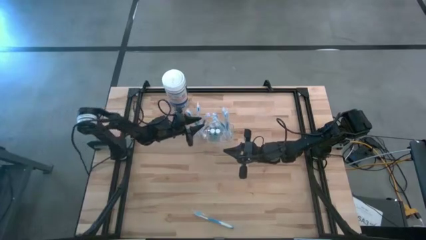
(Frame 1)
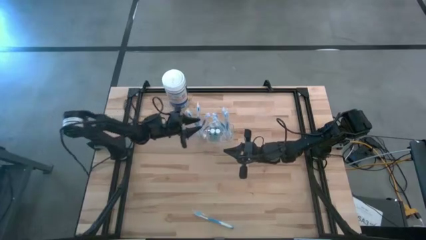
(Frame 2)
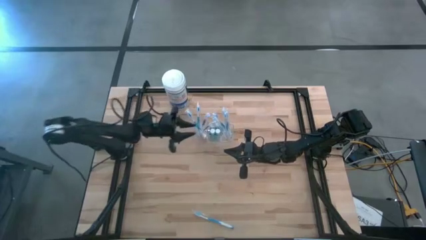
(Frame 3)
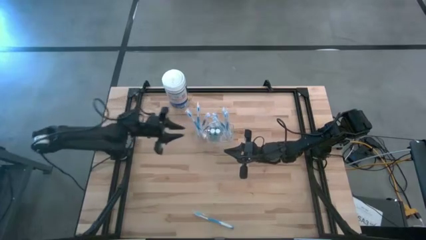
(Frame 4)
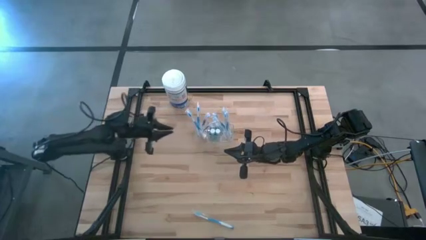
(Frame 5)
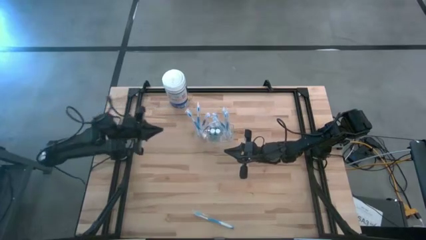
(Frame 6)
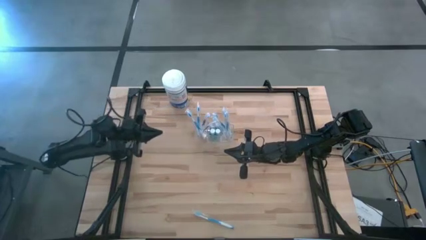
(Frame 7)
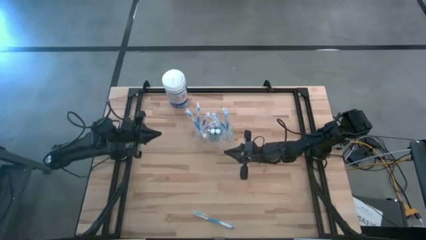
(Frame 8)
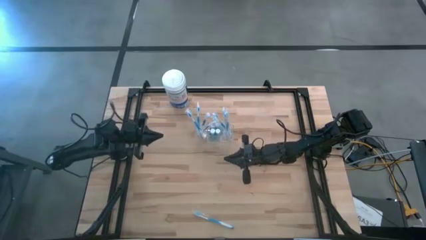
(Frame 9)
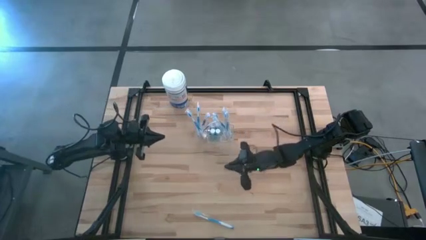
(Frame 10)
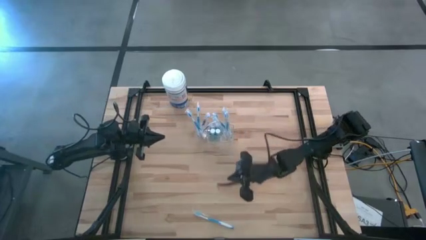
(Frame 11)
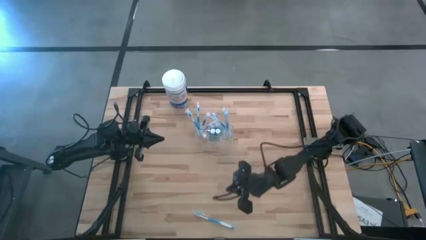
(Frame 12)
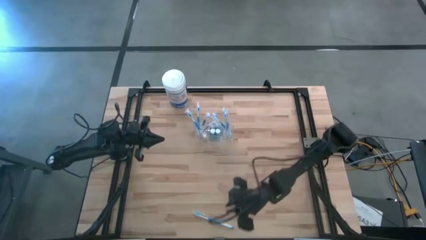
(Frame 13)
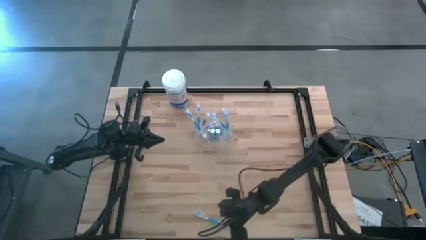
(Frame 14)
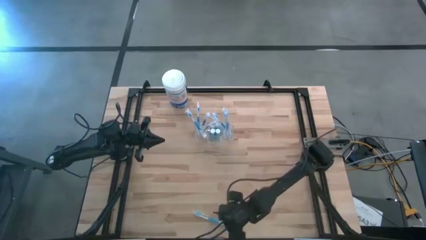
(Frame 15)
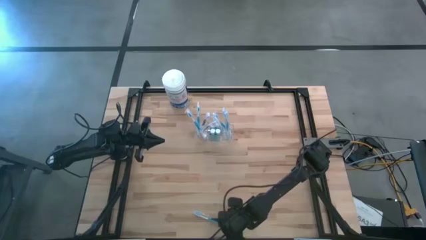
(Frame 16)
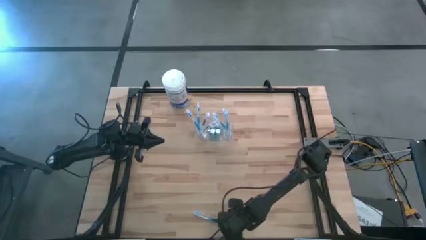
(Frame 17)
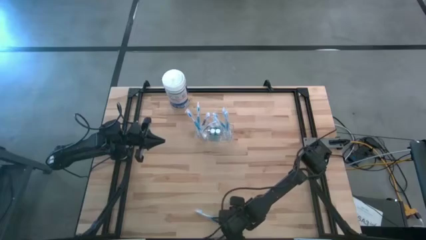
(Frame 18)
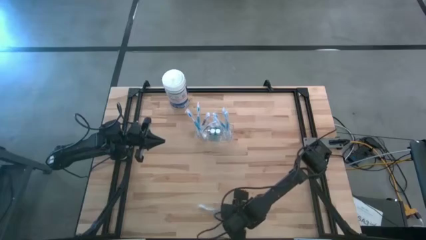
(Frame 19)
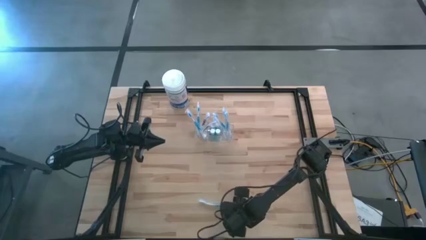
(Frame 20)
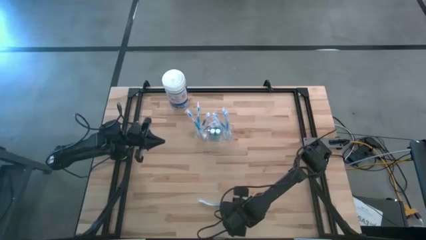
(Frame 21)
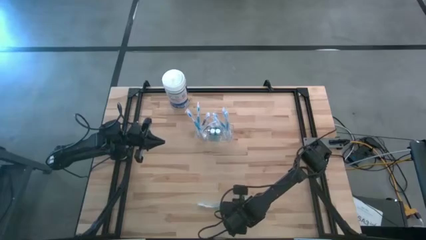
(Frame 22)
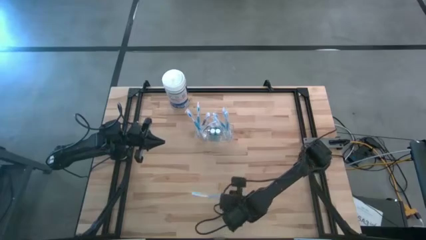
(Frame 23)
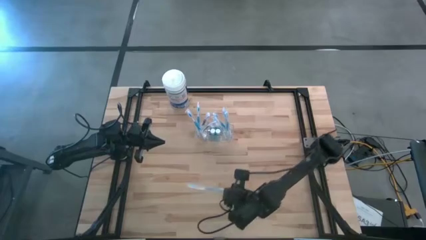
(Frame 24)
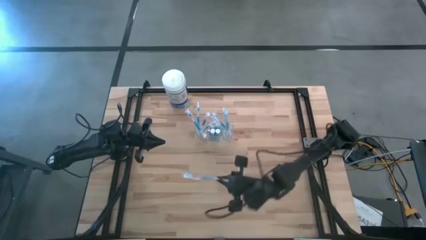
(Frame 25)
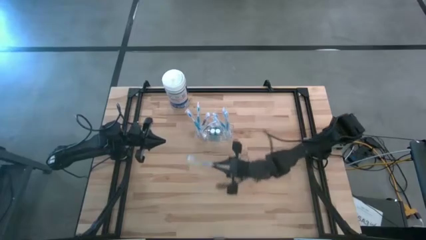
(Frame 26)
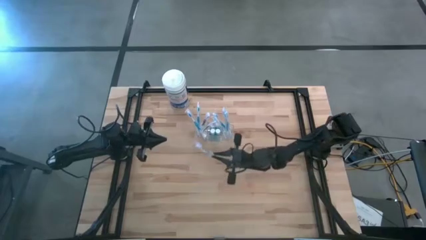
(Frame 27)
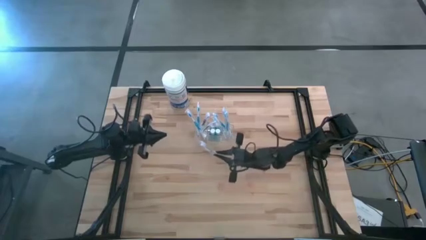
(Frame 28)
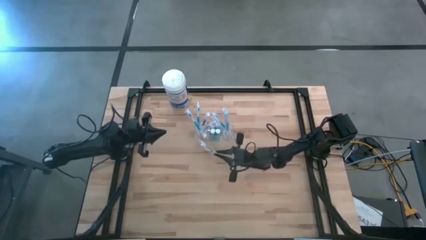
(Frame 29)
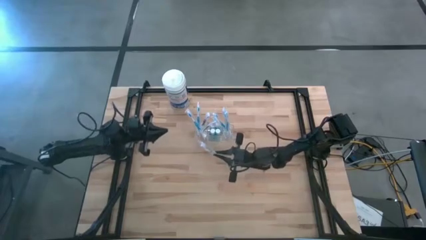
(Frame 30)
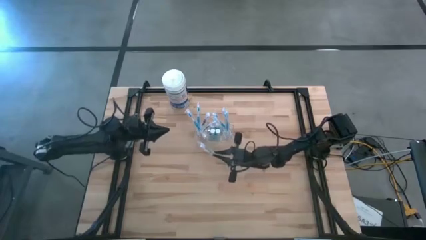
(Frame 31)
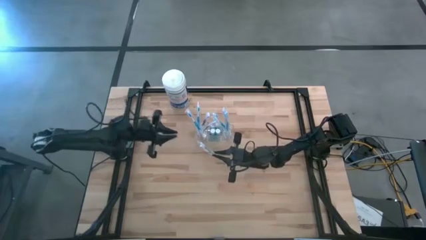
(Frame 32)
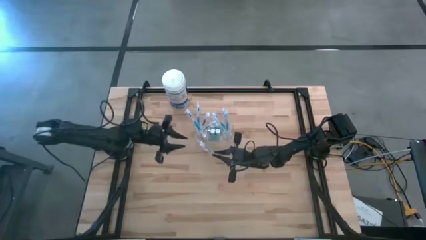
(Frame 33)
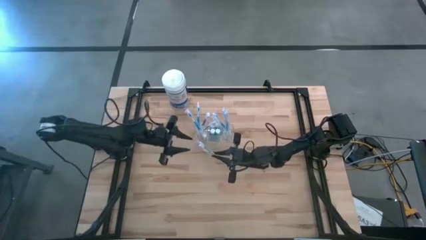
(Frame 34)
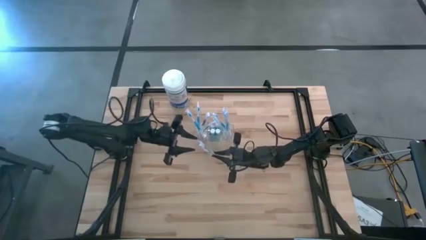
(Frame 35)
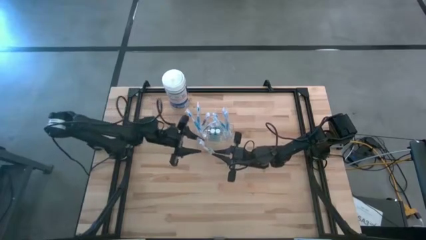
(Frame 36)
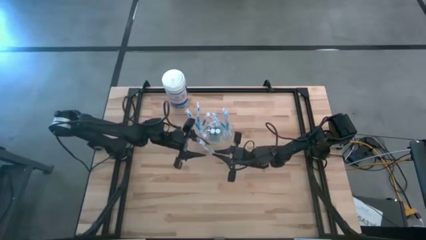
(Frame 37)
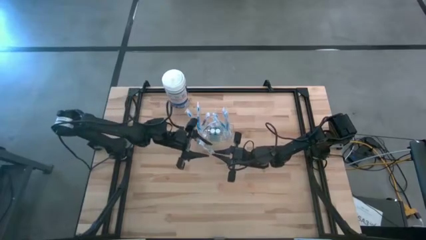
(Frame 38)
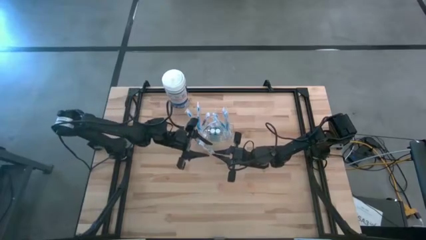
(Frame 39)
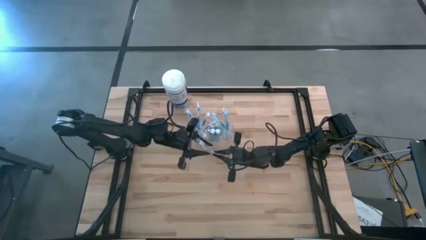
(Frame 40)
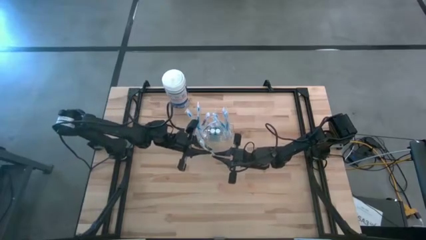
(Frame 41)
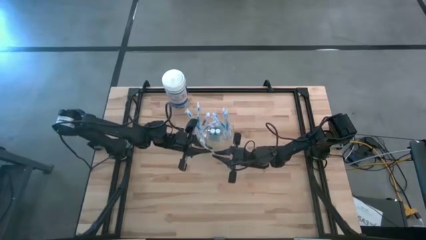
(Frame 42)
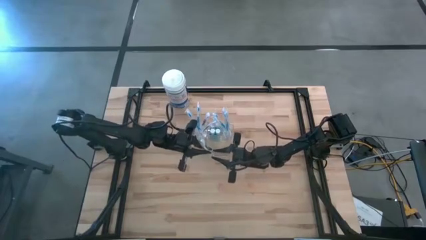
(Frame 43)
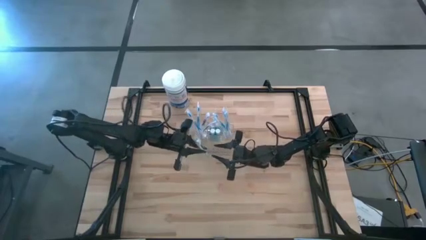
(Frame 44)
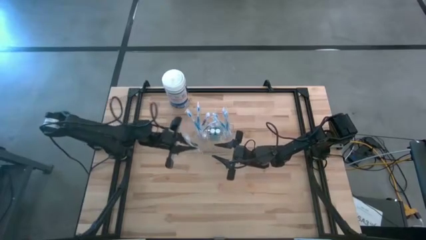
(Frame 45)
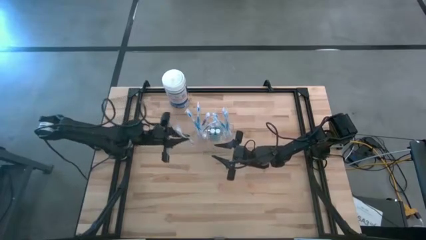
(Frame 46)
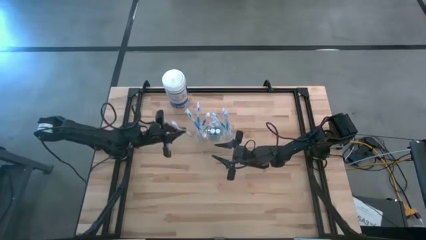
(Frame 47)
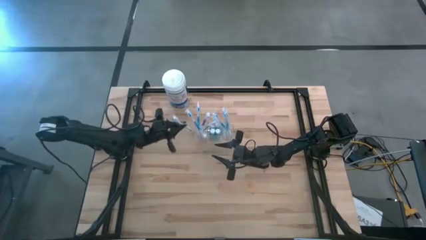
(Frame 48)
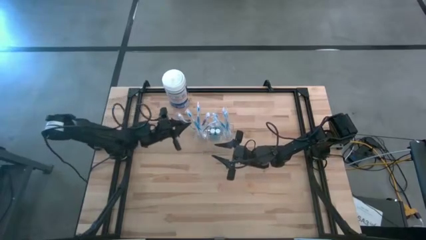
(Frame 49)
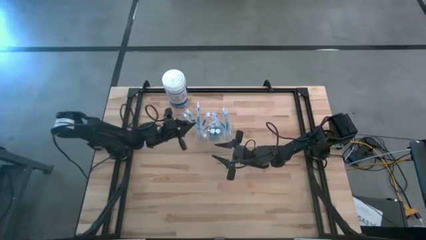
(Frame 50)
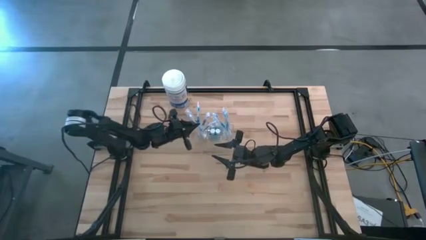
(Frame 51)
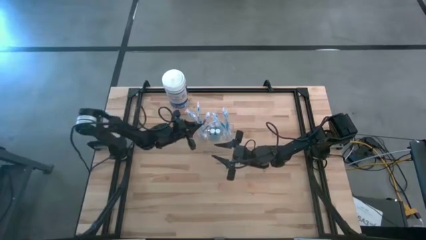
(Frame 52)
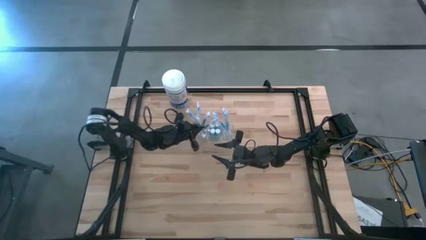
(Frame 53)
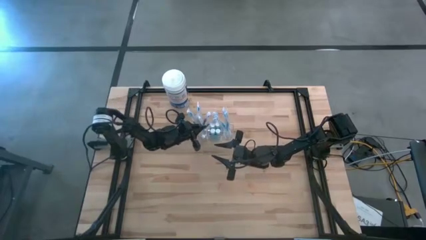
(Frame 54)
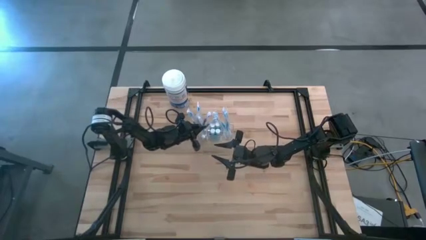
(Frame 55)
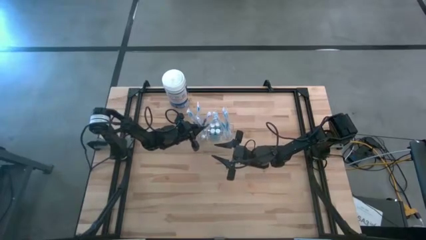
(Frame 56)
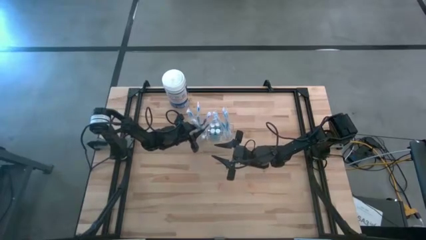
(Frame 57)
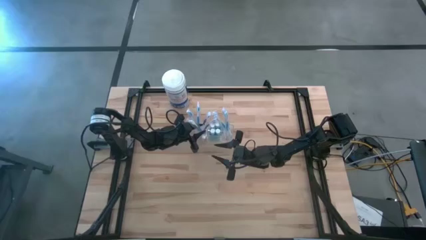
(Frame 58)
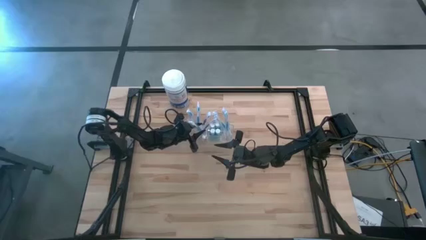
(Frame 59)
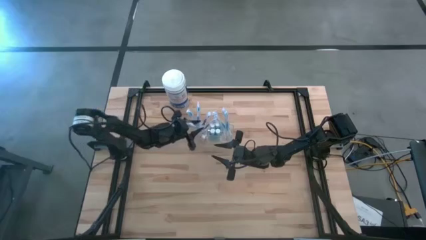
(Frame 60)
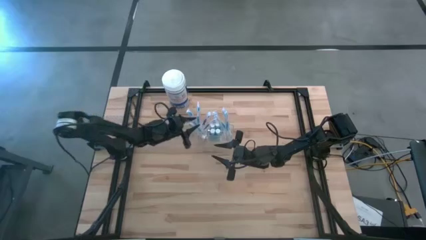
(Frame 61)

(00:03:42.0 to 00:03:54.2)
Task: Pick & Place toothbrushing station
Put the blue toothbrush in the transparent organizer

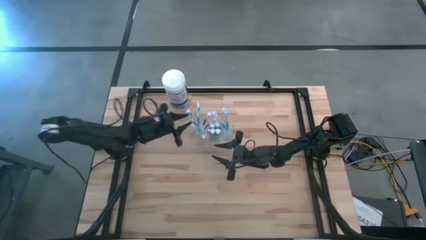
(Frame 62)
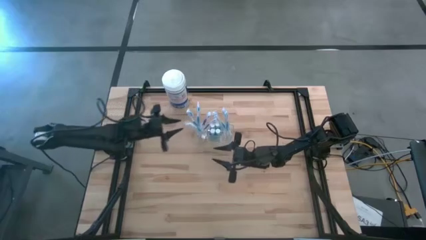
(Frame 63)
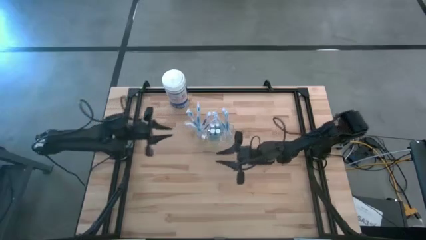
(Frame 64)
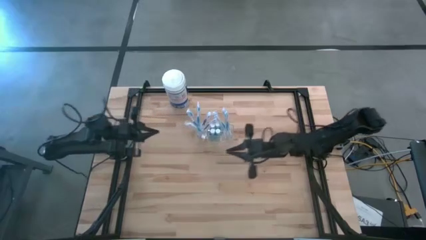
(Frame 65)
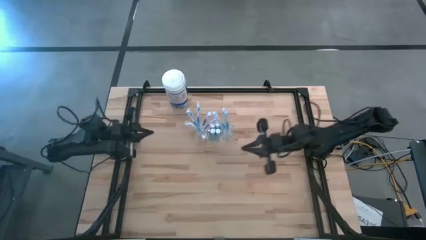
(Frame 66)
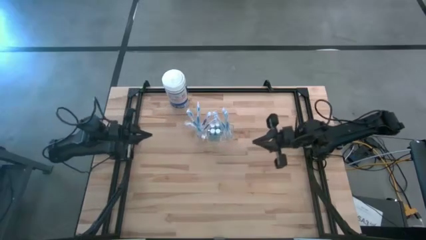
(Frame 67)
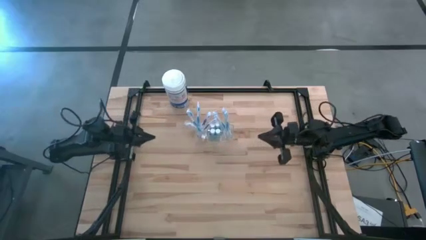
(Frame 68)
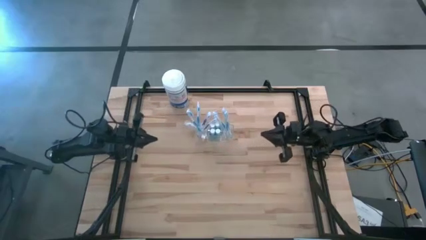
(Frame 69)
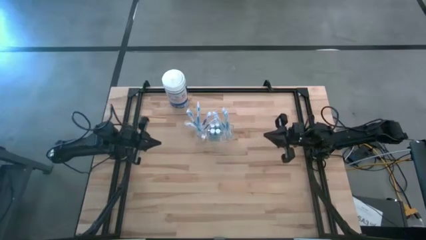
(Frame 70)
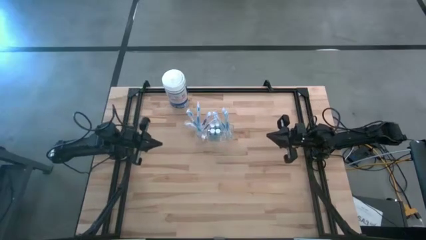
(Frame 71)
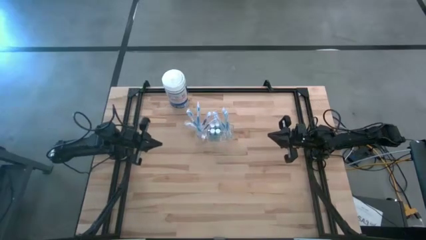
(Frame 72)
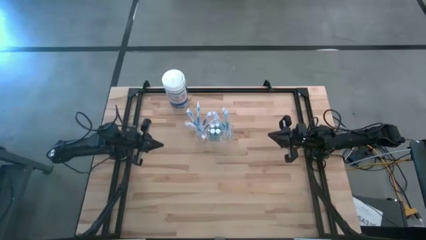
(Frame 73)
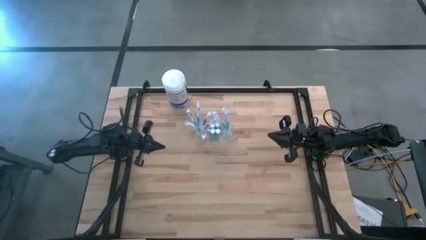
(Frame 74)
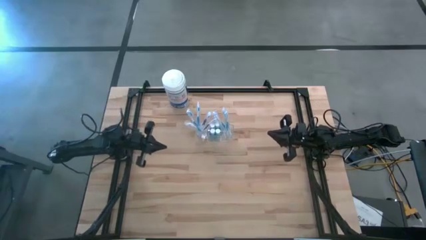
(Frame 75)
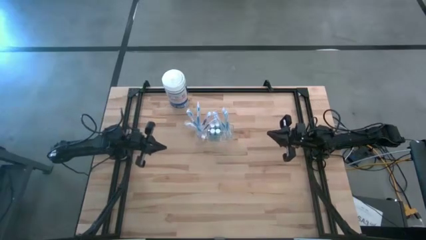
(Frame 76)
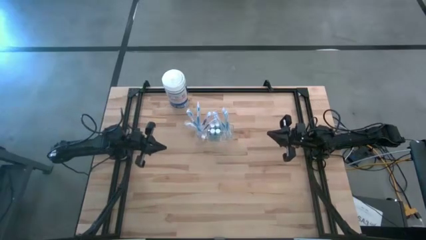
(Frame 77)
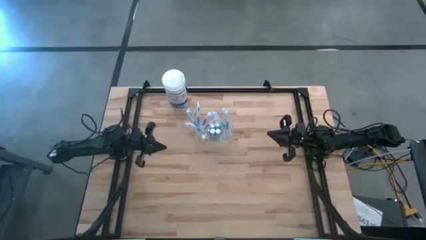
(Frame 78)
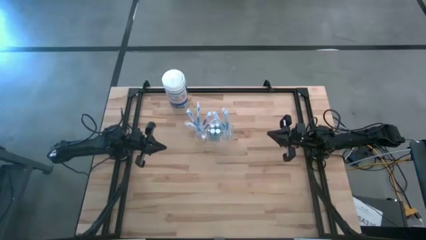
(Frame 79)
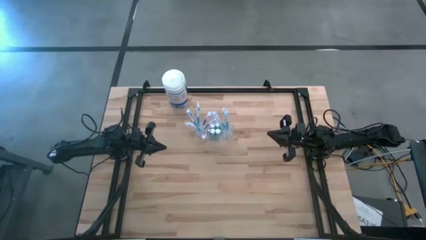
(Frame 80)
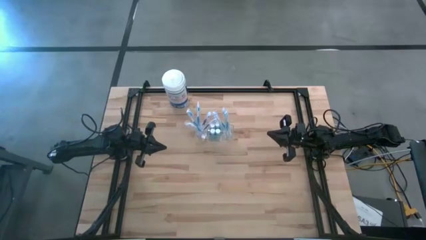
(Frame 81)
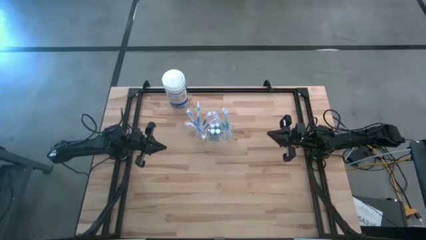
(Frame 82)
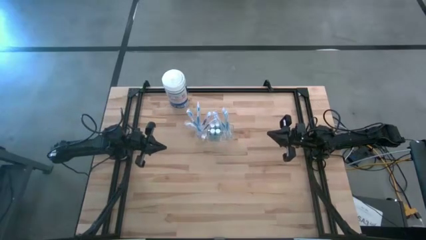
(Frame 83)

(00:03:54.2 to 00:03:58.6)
Return to Home Position
